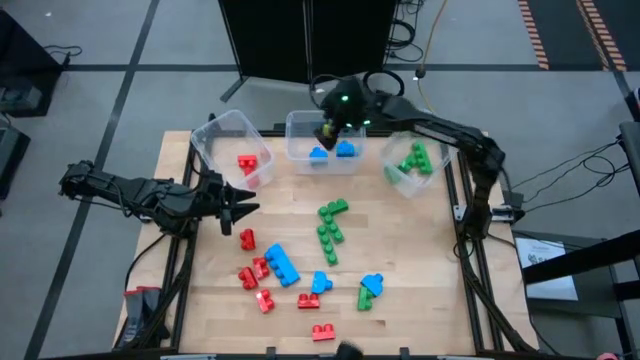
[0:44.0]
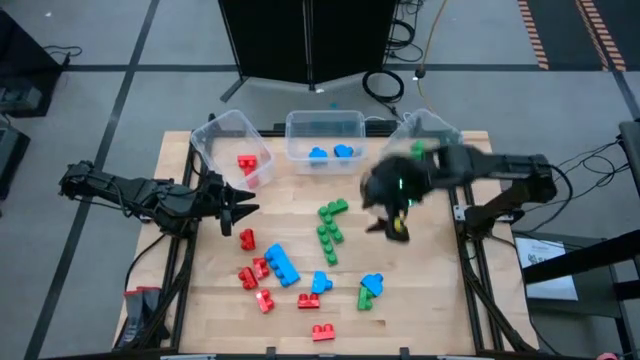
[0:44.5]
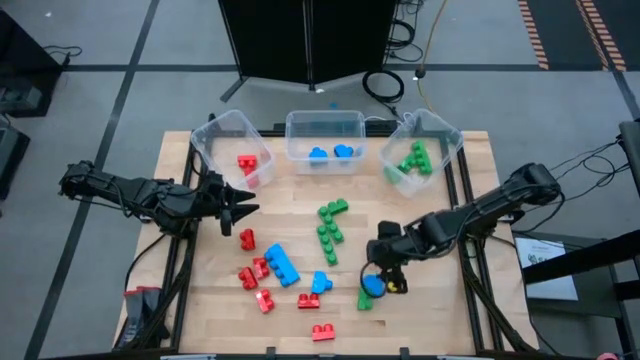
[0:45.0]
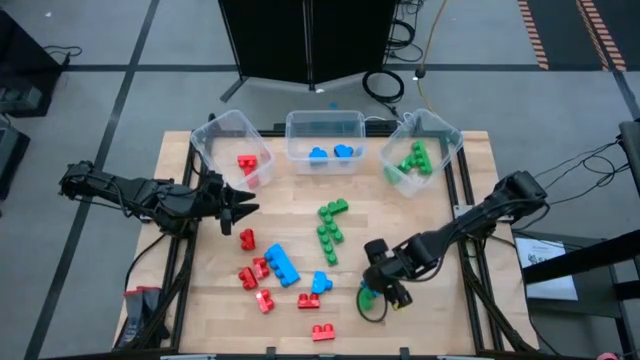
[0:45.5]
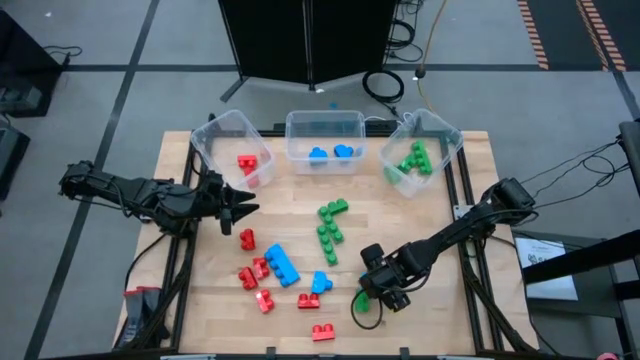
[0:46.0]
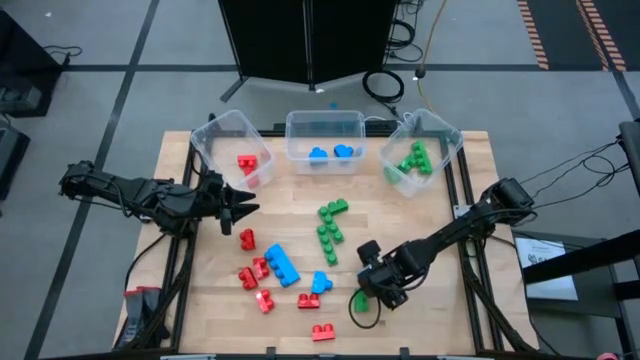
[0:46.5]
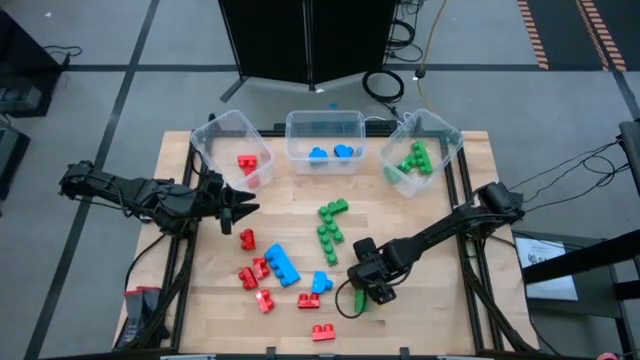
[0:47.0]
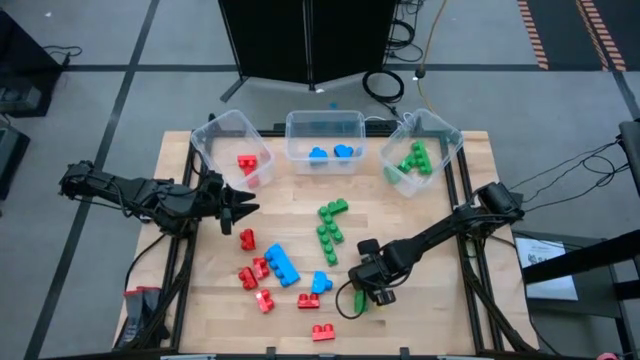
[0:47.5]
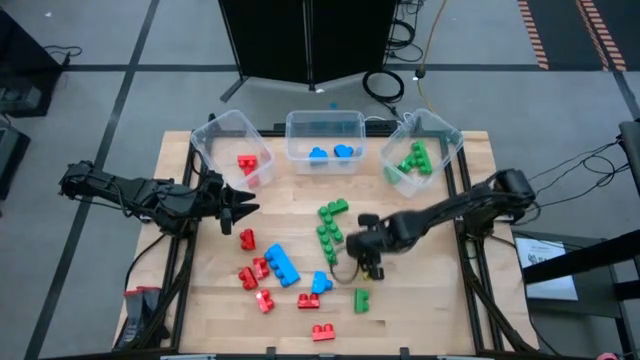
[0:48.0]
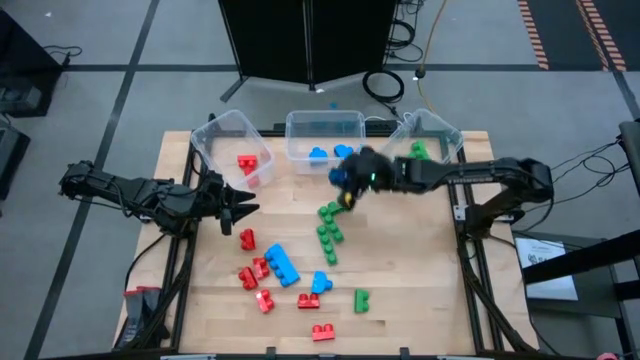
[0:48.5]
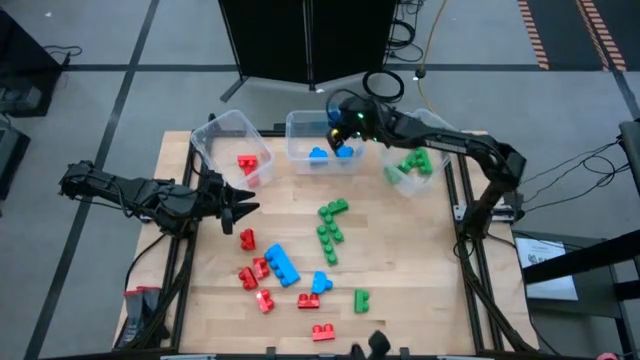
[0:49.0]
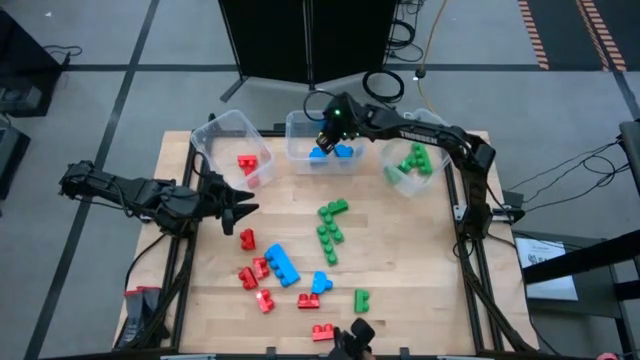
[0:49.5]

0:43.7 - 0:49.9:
Task: Sort blocks
Put the blue game piece into the middle transparent bin

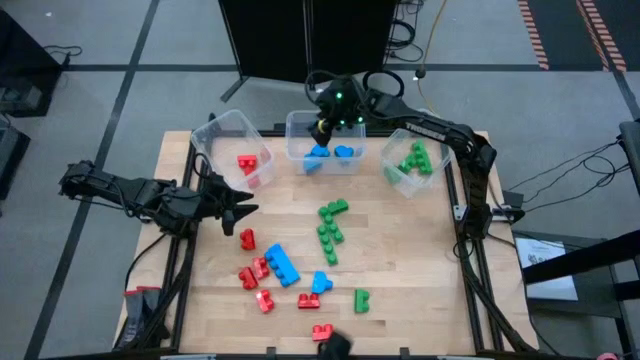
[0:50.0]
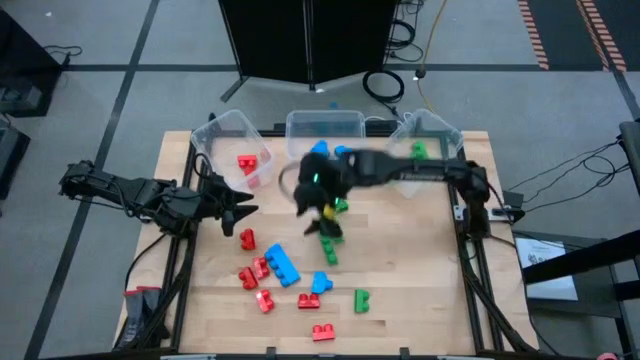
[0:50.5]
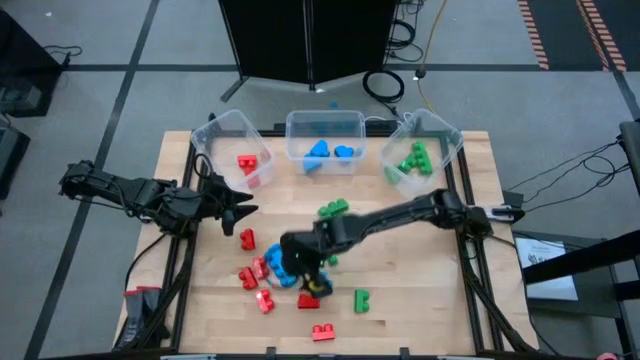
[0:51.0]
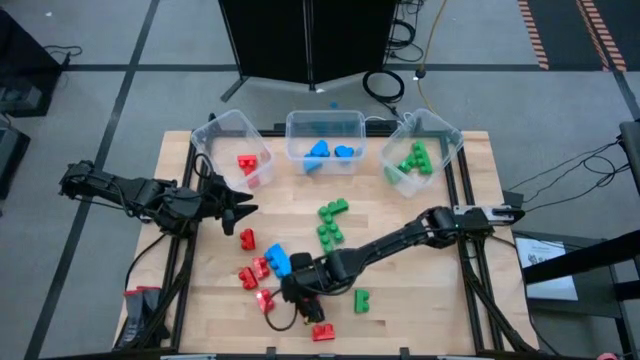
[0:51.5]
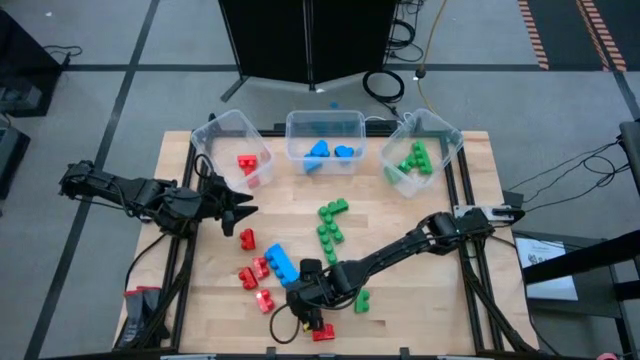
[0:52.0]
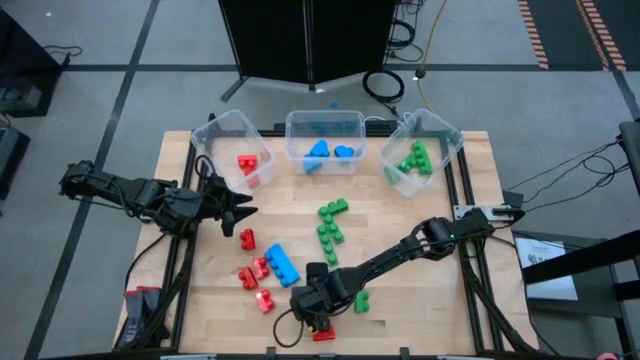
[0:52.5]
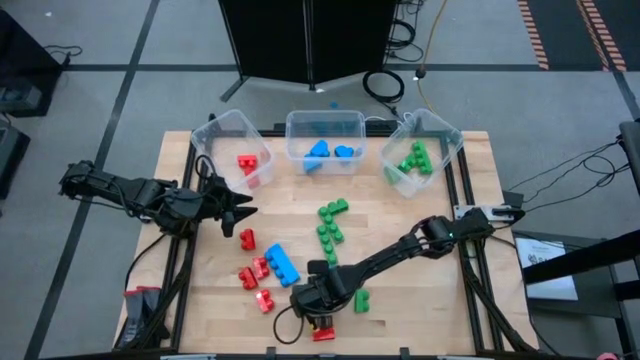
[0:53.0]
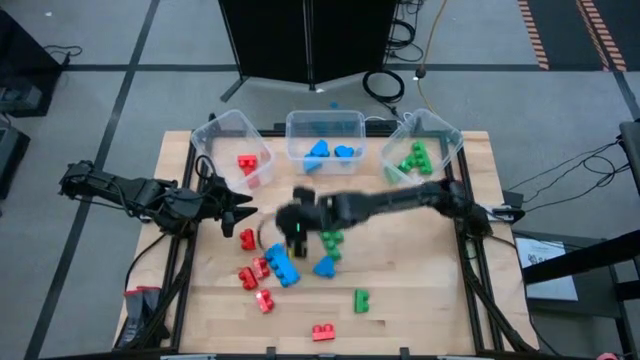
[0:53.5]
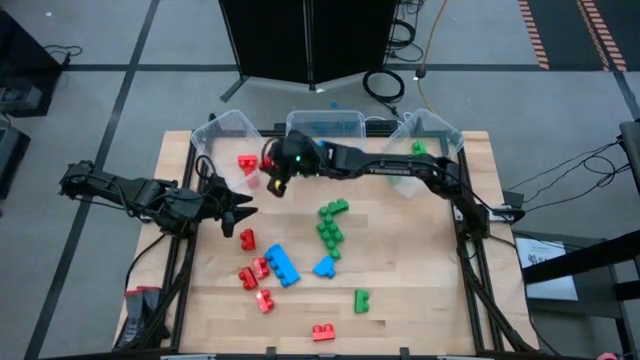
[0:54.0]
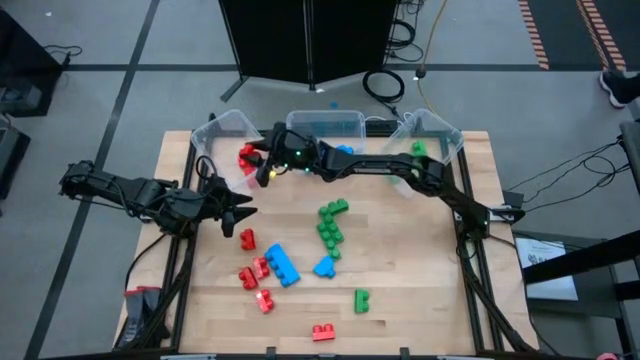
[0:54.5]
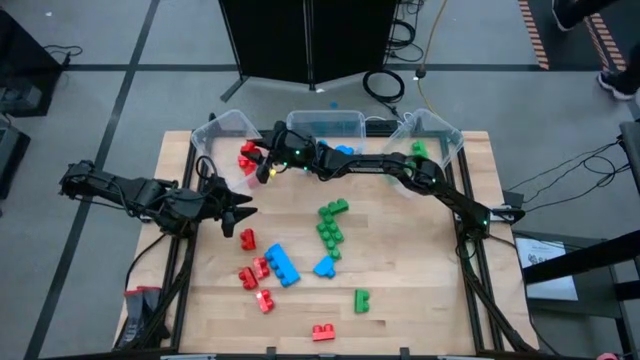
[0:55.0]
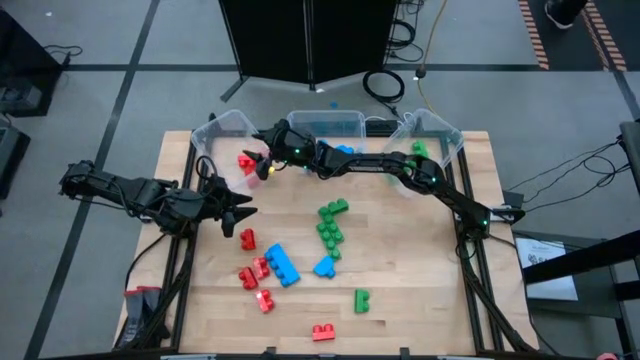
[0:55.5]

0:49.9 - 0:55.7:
Put the red game piece into the left transparent bin

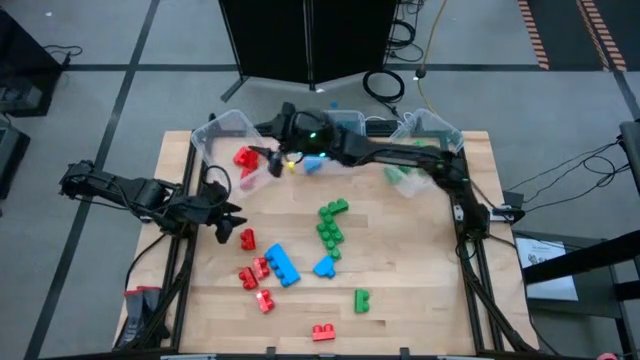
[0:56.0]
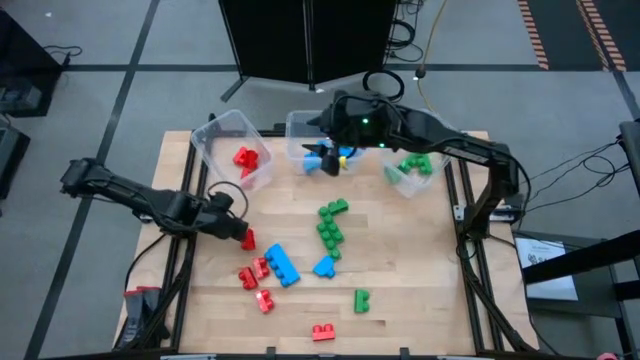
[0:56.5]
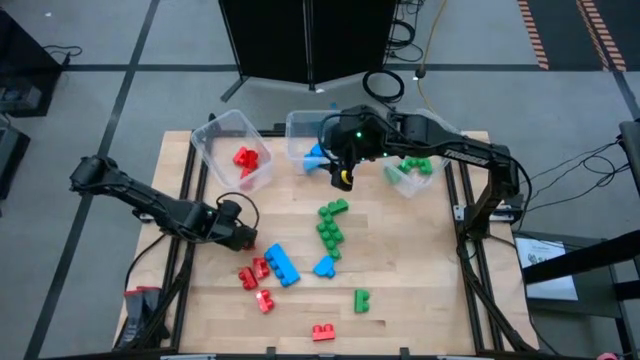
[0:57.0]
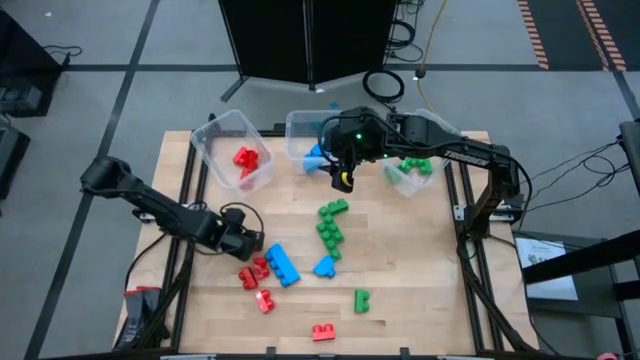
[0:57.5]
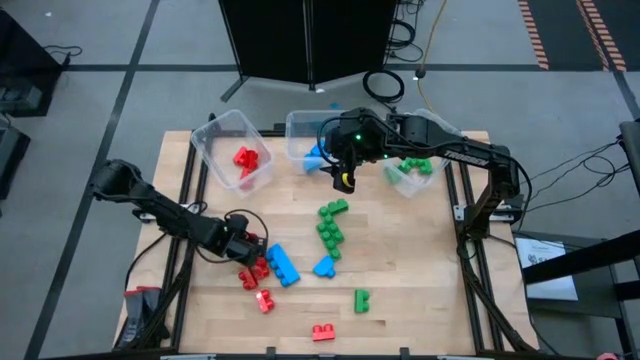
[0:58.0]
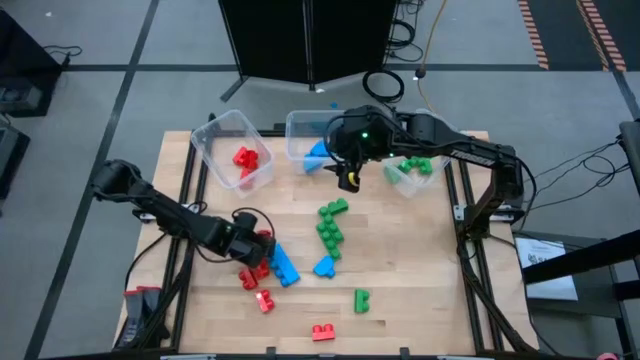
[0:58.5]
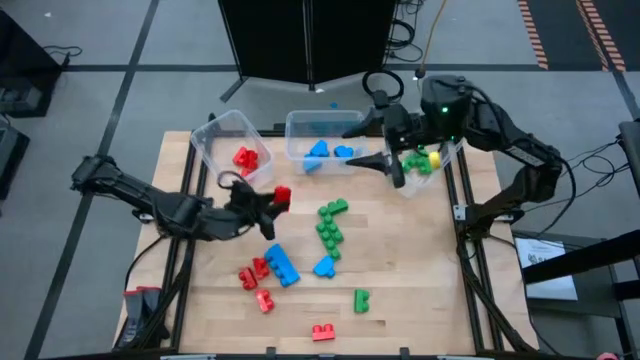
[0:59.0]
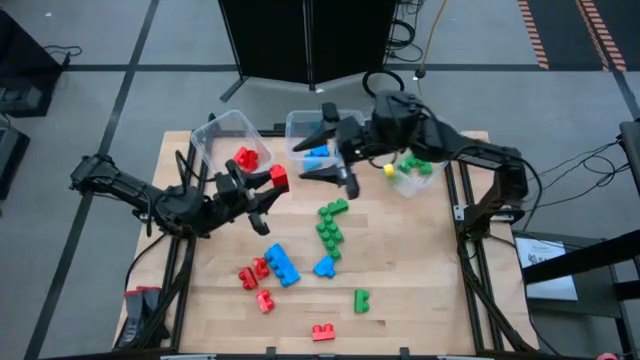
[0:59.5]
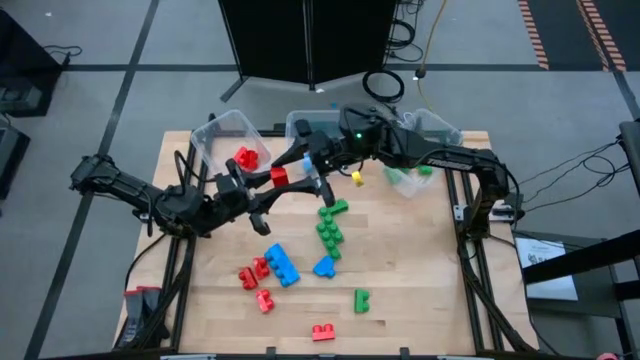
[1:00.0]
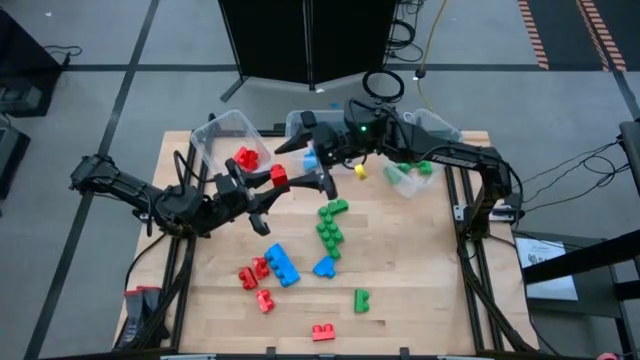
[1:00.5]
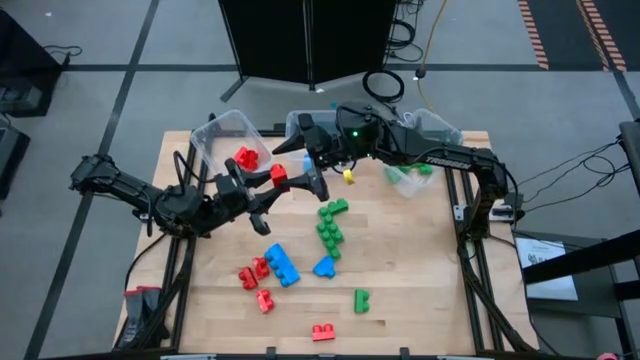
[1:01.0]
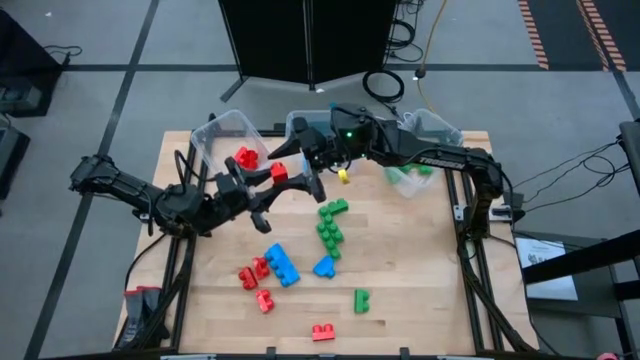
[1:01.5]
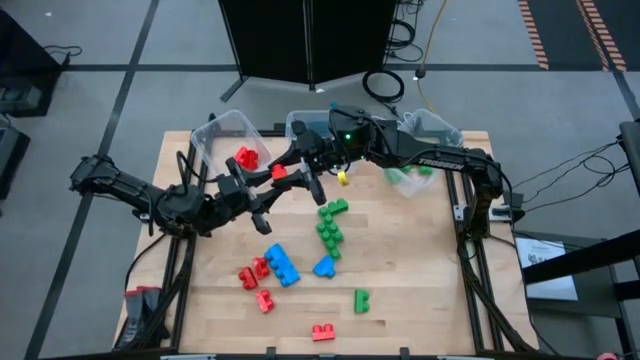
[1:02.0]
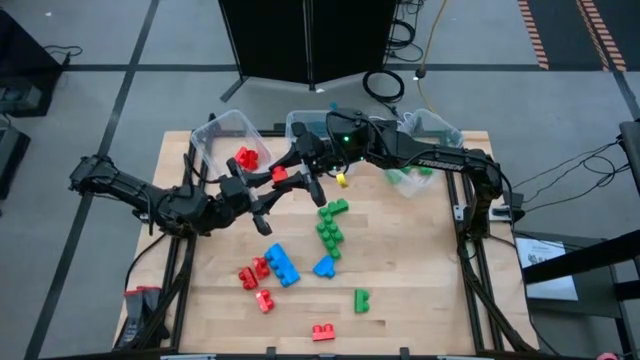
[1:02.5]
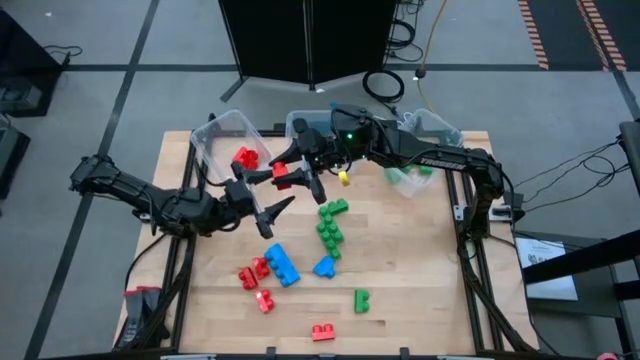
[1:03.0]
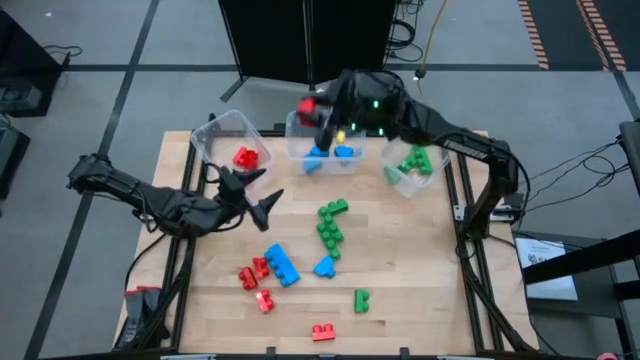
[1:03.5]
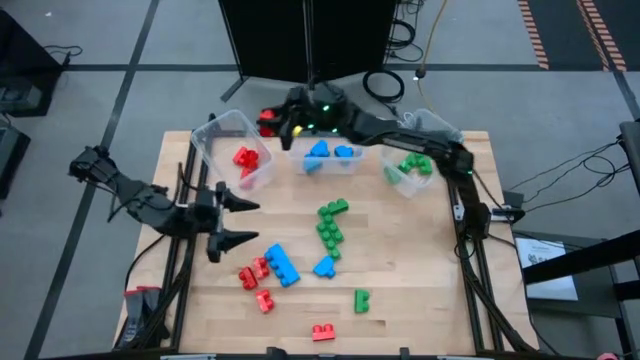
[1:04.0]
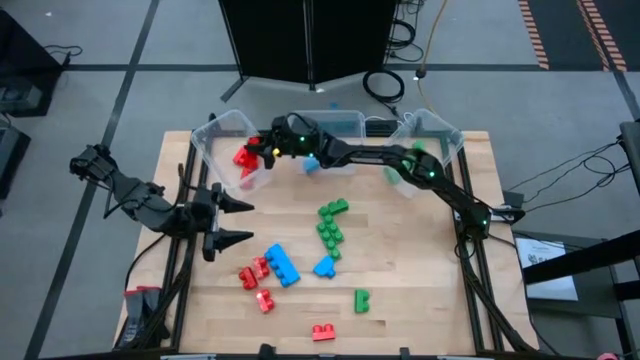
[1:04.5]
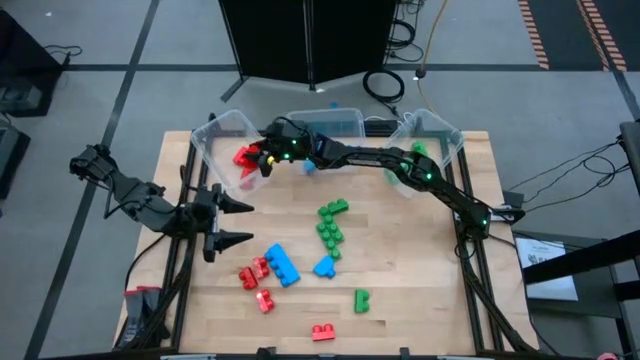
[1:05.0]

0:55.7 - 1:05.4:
Put the red game piece into the left transparent bin

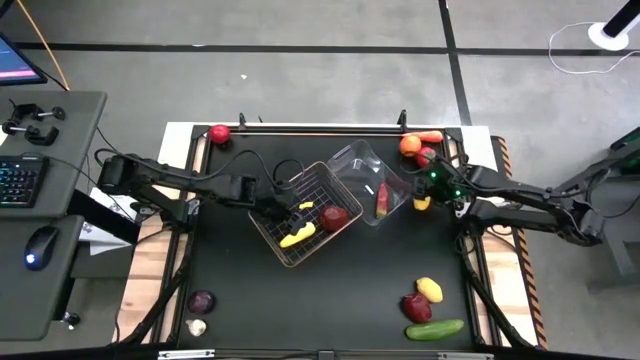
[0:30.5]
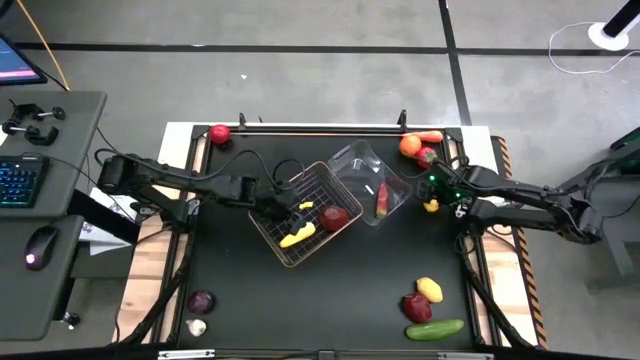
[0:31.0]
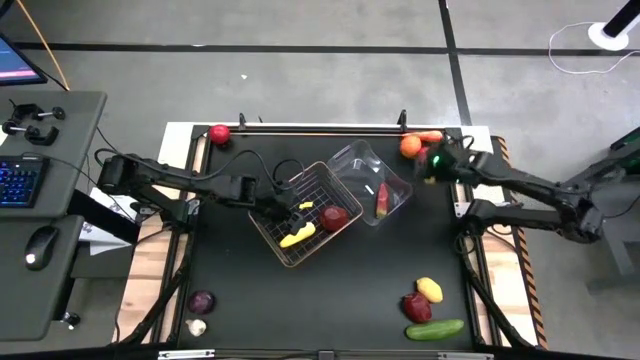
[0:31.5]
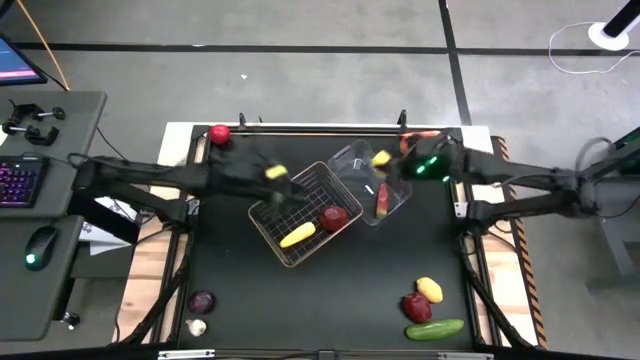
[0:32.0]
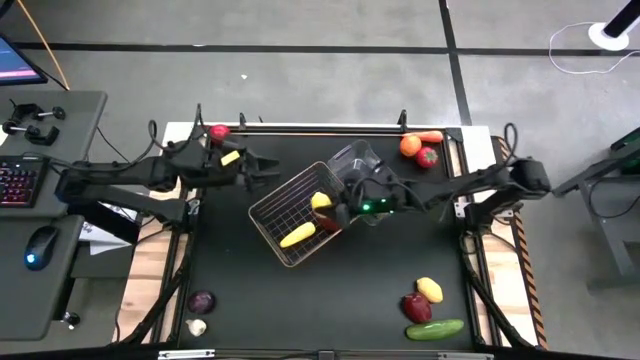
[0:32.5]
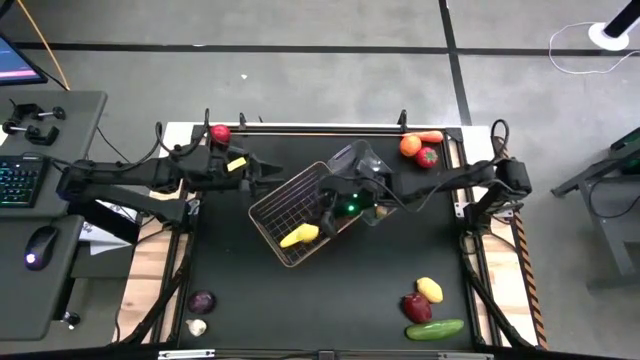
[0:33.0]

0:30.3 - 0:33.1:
Task: Sort produce into baskets
Put the top lemon into the gold wire basket
